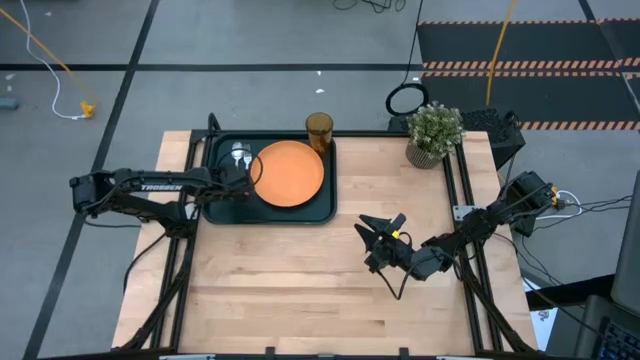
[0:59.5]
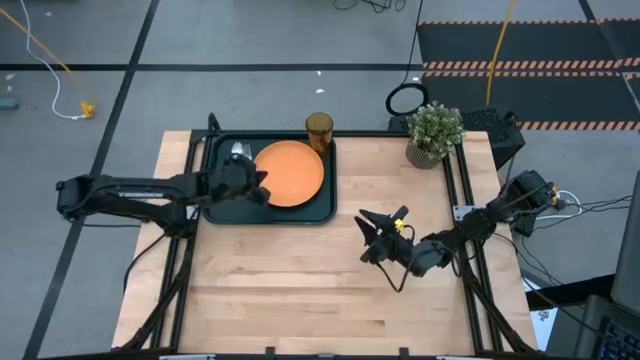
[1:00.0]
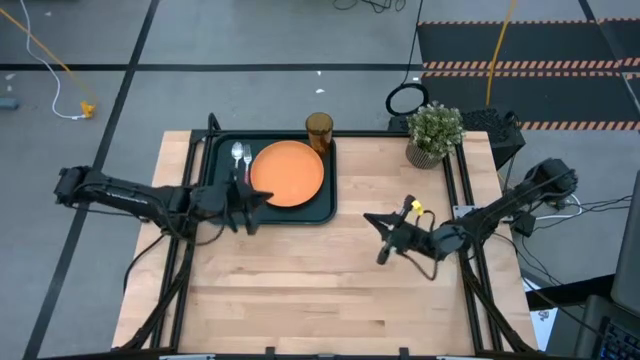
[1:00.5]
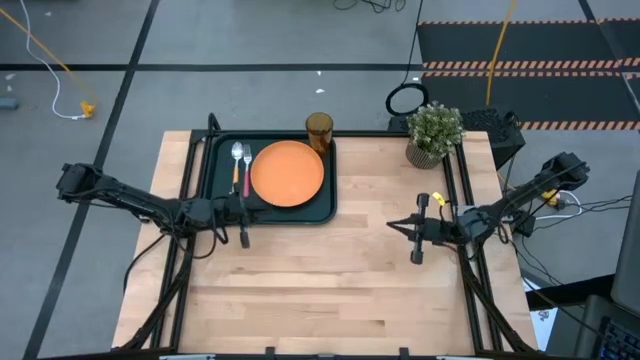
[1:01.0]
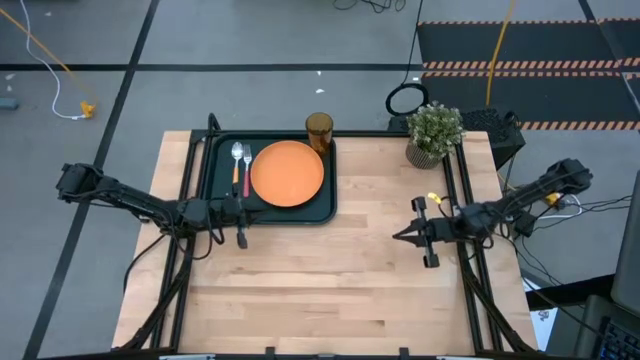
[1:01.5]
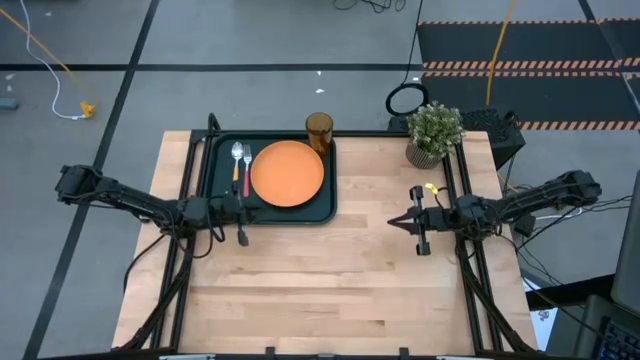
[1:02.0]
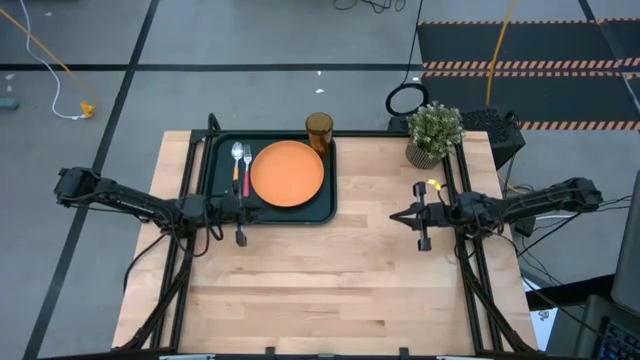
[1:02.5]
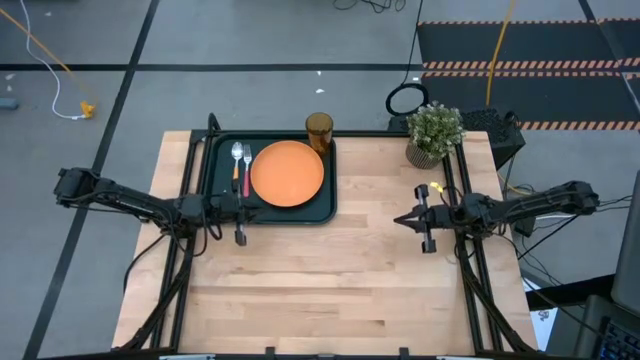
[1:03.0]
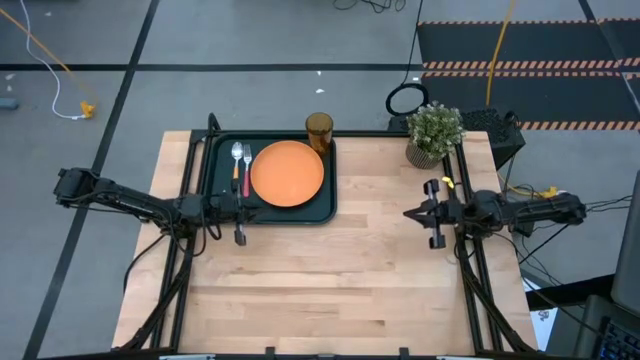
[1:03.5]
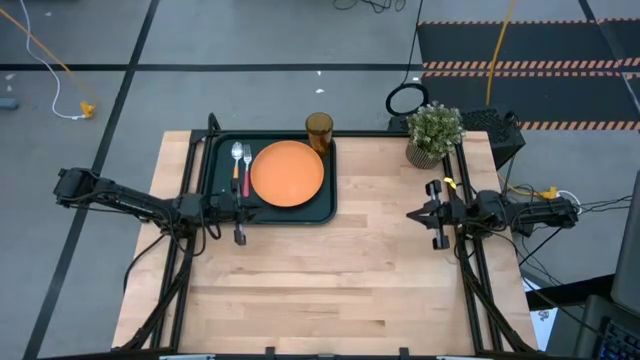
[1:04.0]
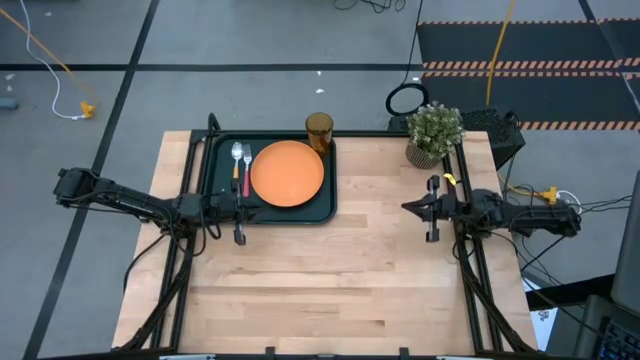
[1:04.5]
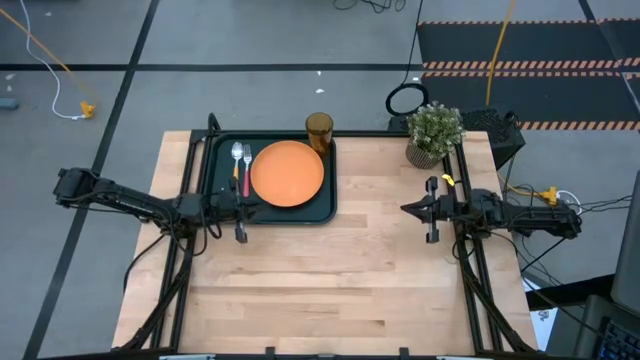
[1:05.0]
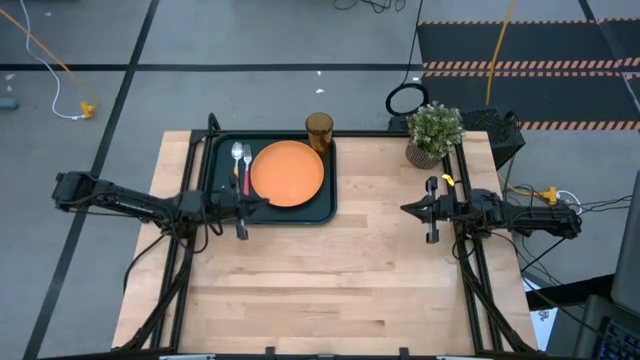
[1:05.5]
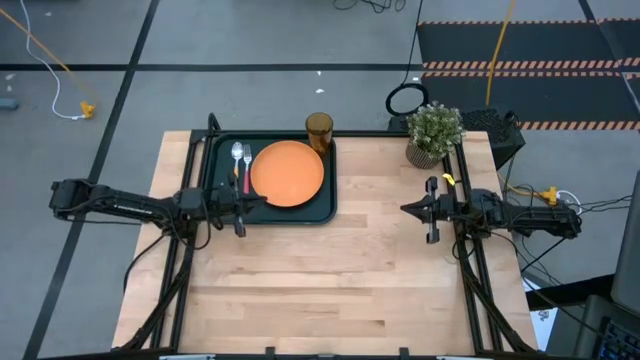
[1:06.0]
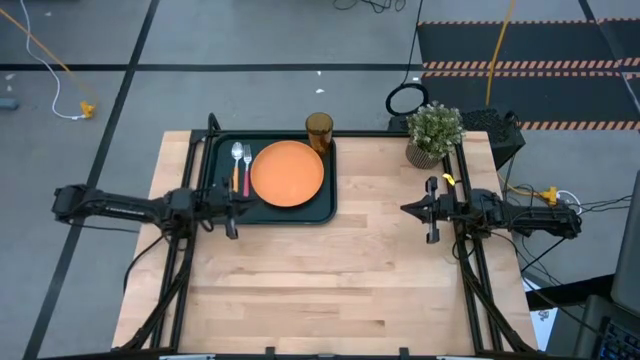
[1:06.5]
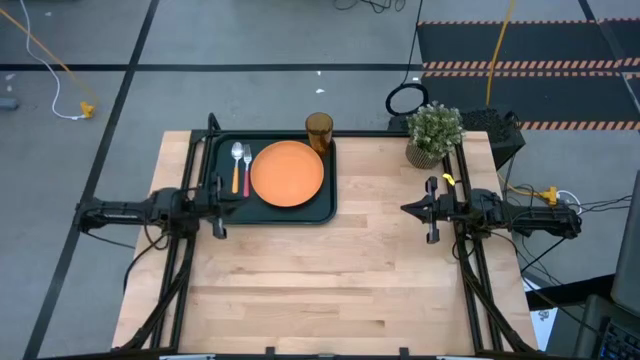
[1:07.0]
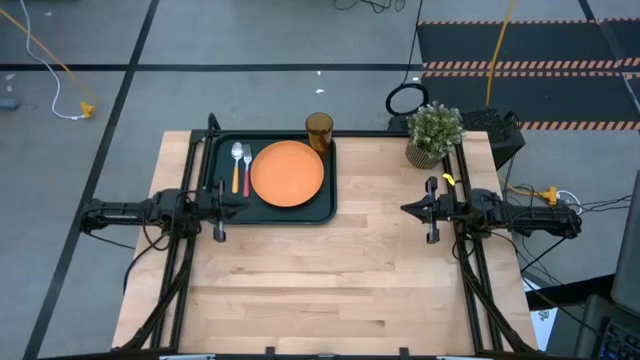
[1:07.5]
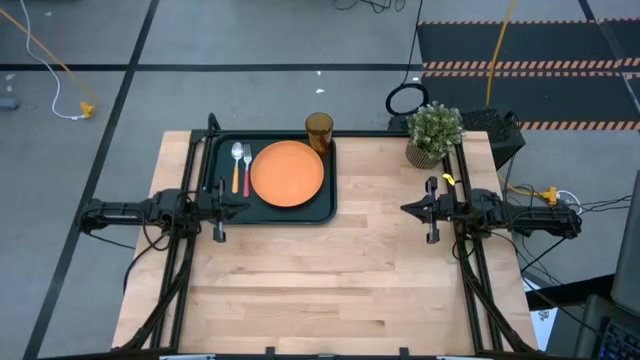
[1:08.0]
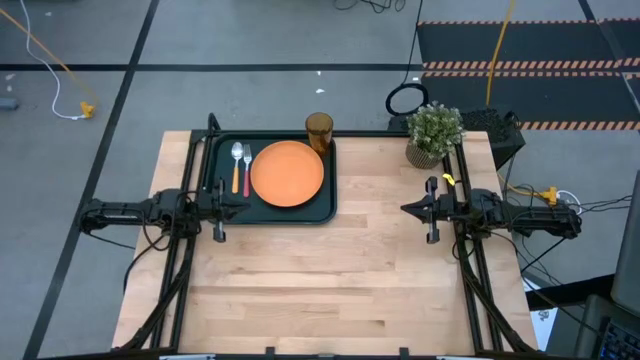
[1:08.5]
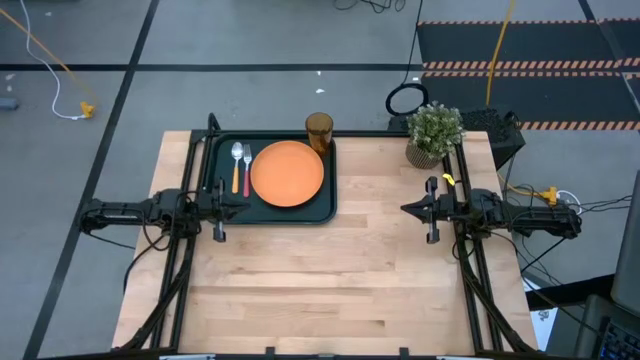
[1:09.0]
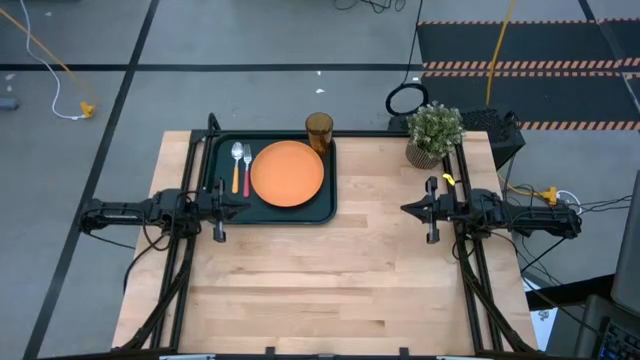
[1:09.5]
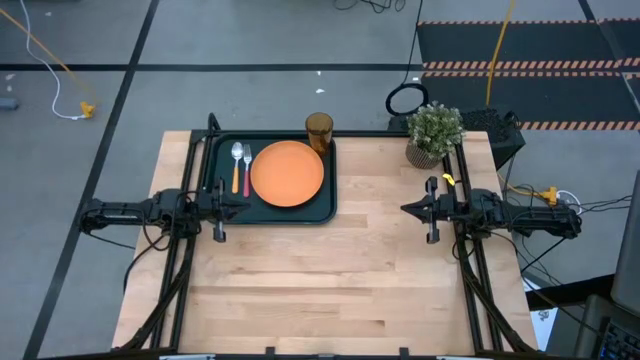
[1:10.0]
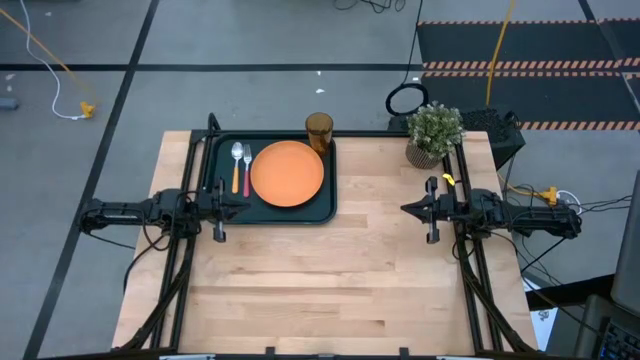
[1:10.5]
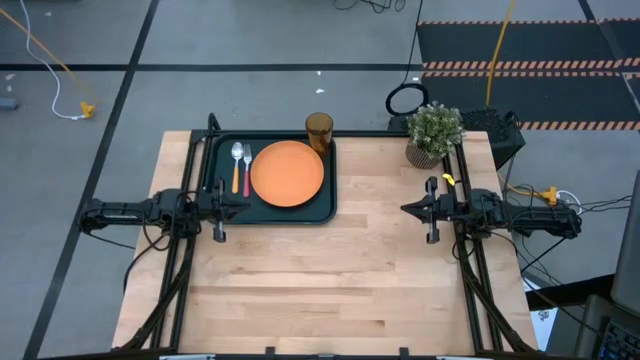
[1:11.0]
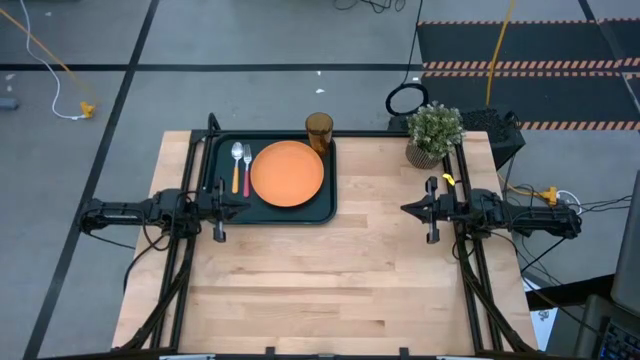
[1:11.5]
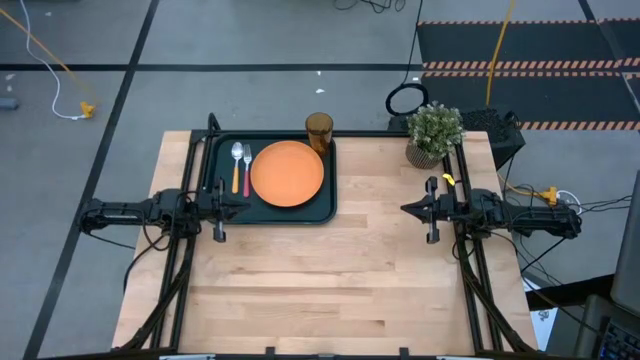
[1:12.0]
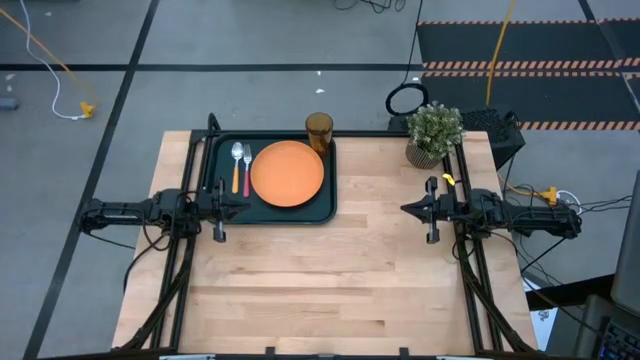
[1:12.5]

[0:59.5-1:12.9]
Task: Pick and place plate/cup/fork/spoon on tray
Return to Home Position

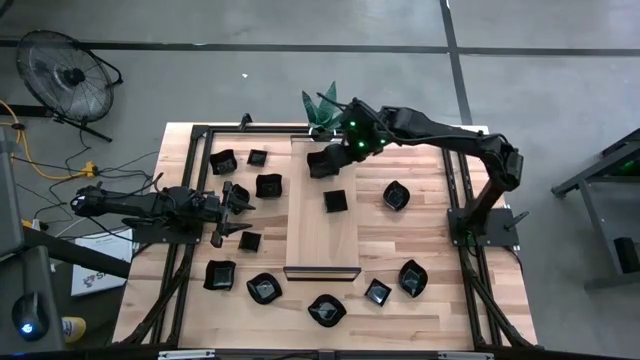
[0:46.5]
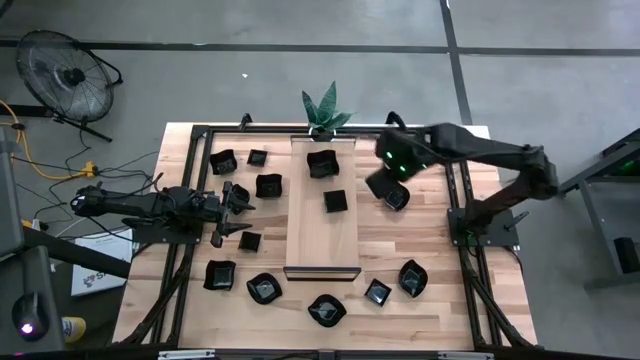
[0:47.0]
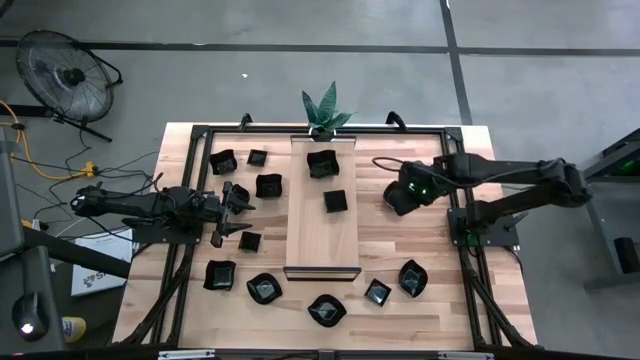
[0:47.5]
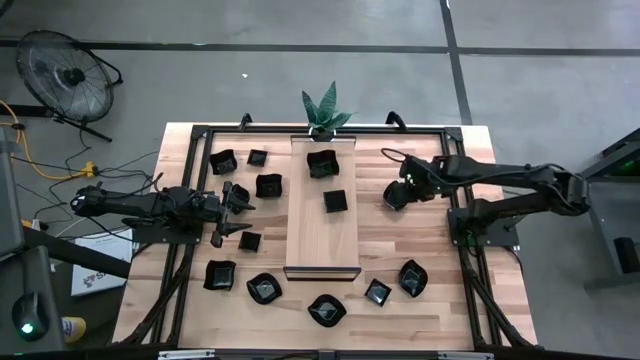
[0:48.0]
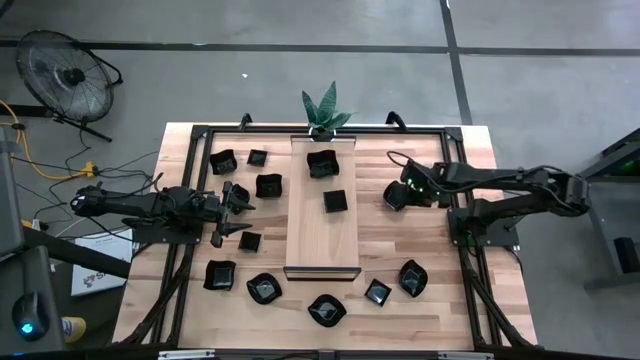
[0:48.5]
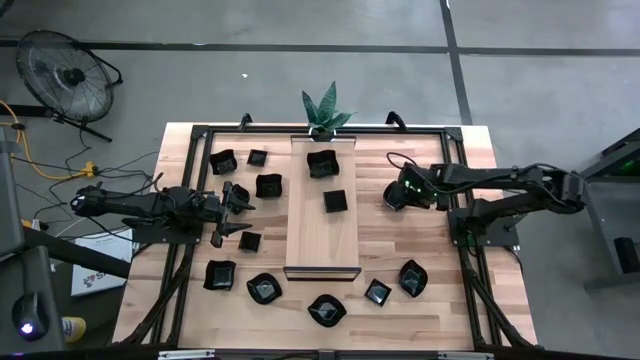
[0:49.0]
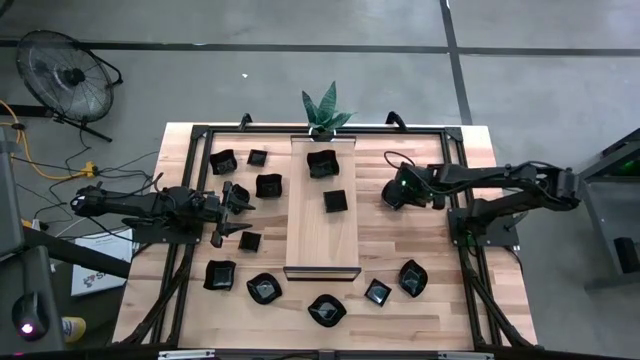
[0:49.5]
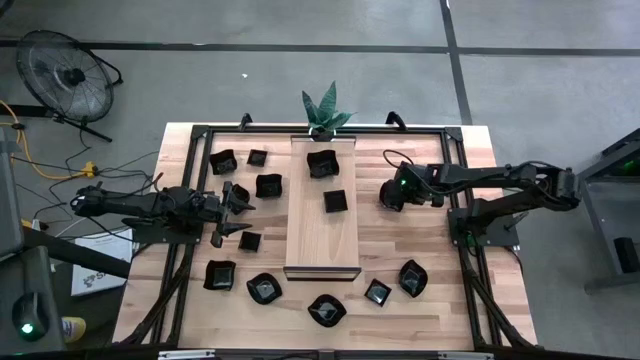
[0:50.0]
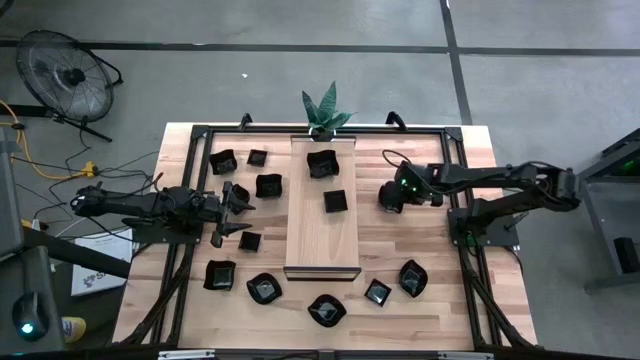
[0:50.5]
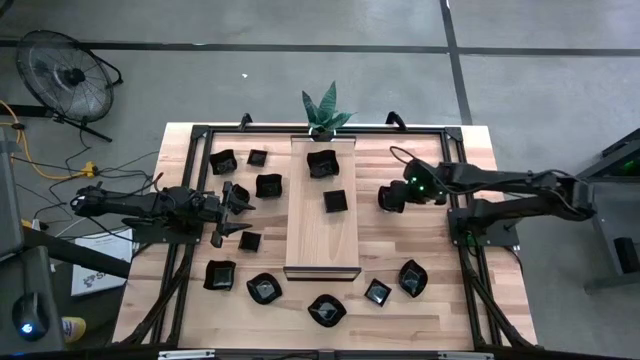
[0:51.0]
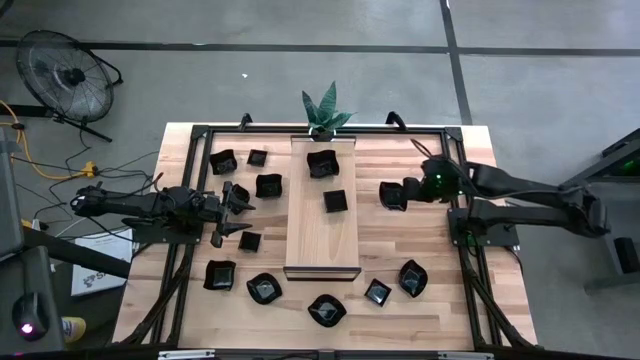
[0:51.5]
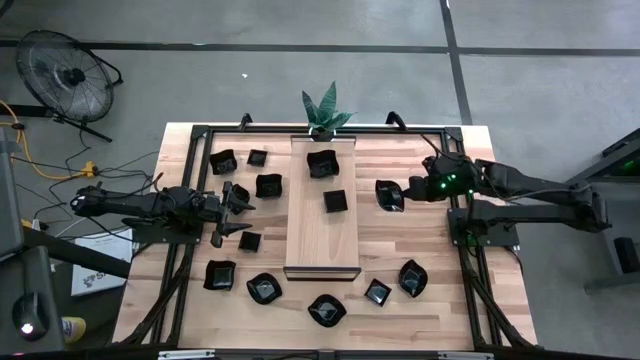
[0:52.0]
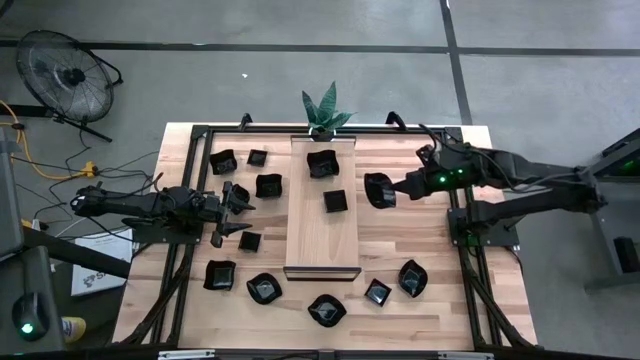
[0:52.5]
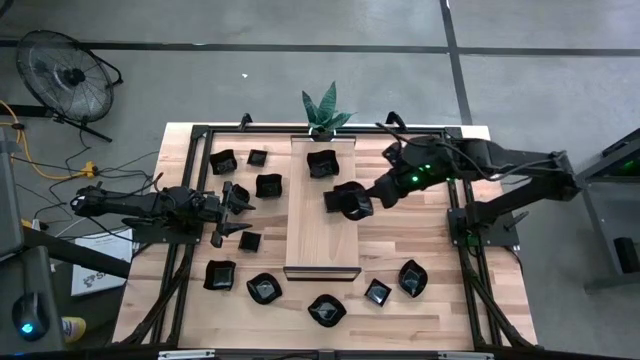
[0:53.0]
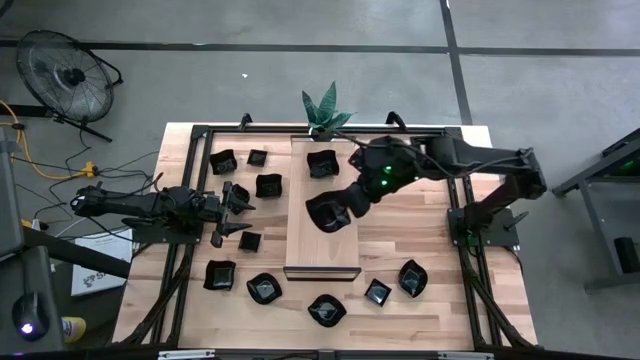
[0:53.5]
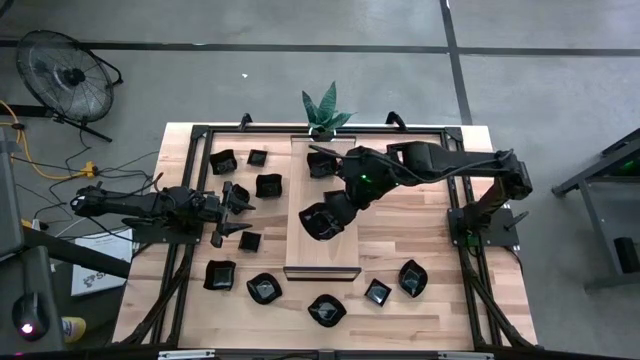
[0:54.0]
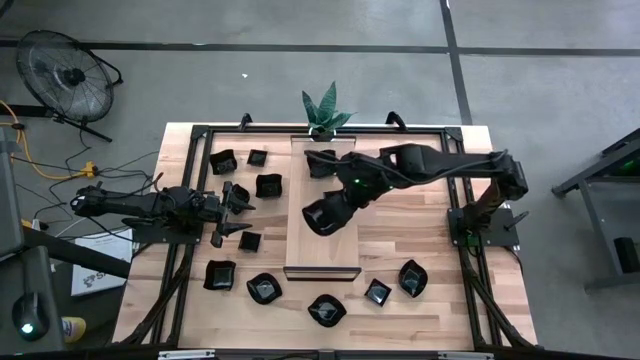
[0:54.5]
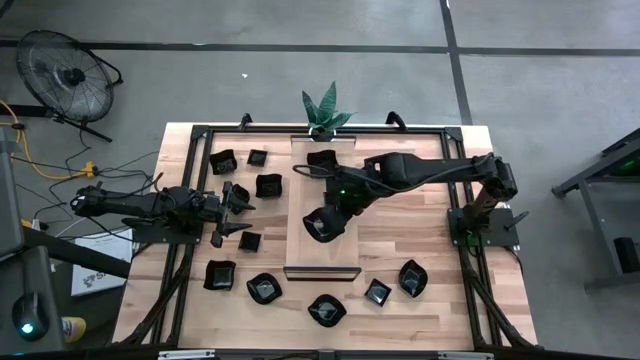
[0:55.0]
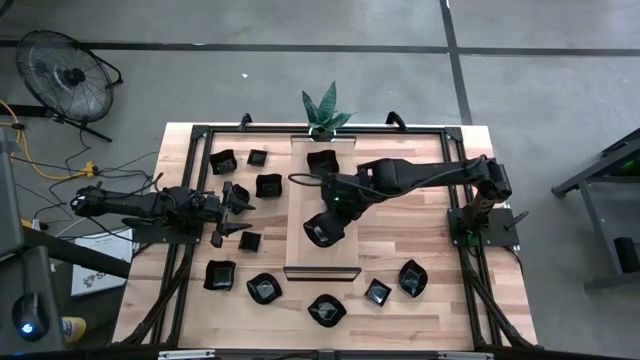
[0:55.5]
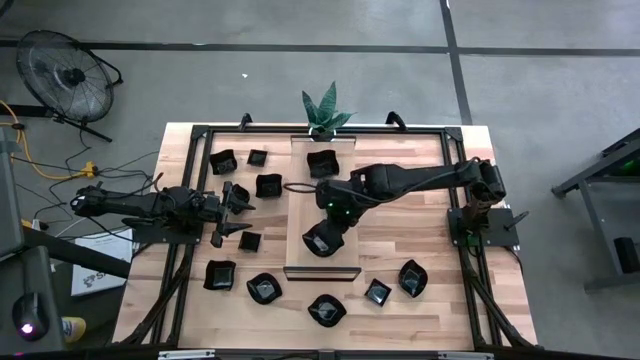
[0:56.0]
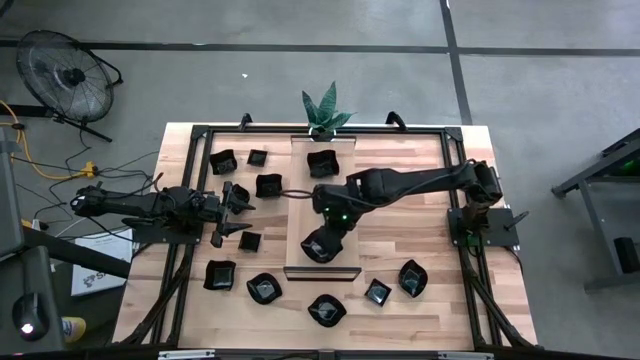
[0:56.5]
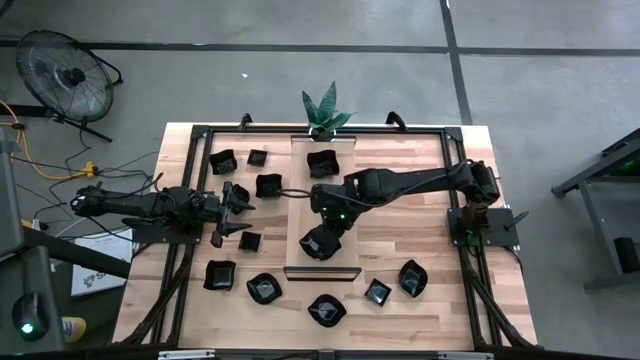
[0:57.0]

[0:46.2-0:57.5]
Task: Pick & Place Mini shaped plates
Put the black leaf shaped plate on the shelf
